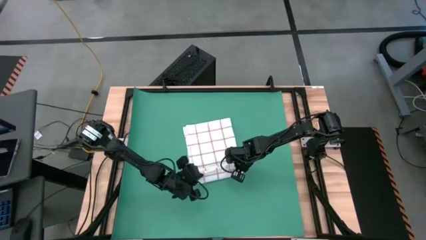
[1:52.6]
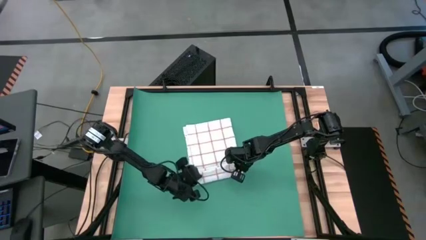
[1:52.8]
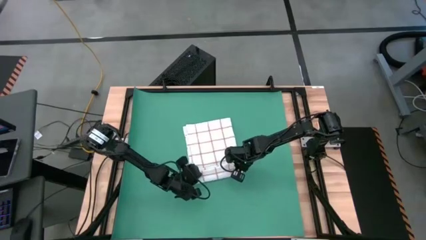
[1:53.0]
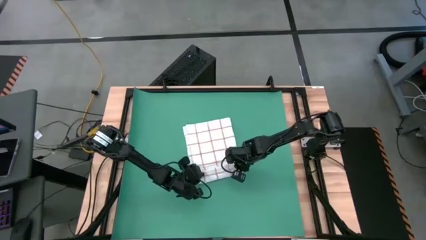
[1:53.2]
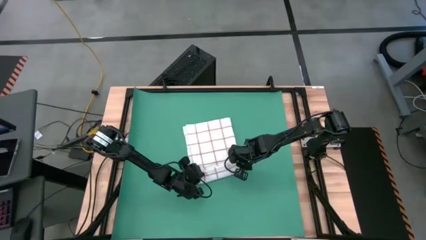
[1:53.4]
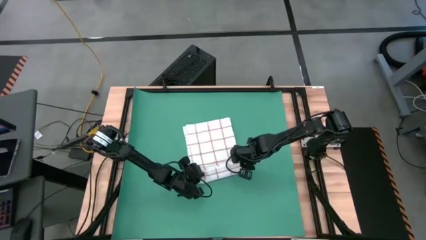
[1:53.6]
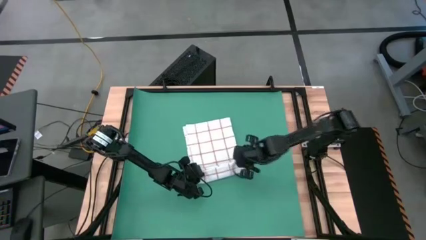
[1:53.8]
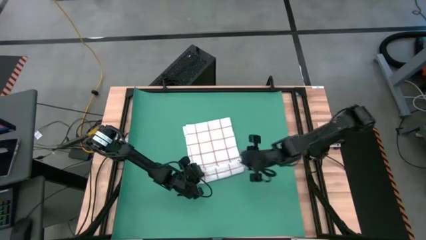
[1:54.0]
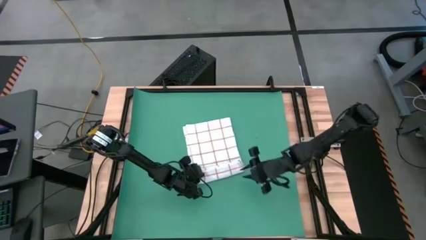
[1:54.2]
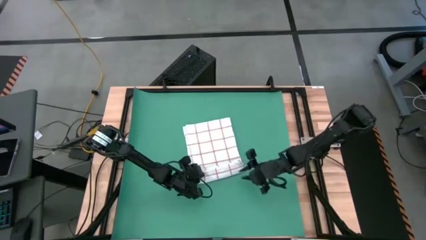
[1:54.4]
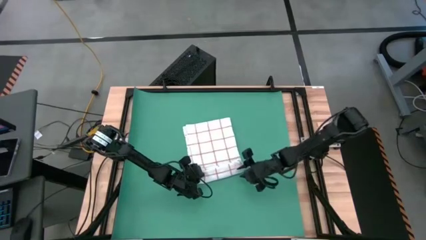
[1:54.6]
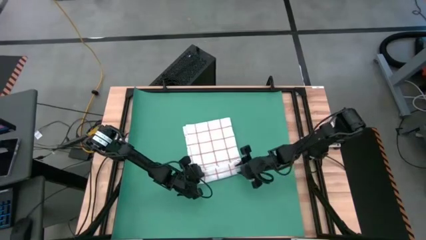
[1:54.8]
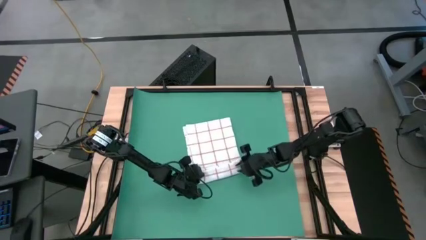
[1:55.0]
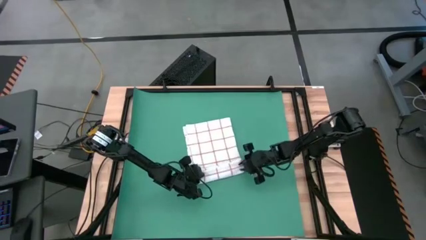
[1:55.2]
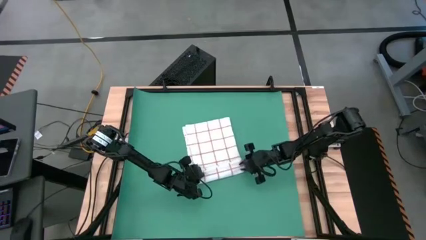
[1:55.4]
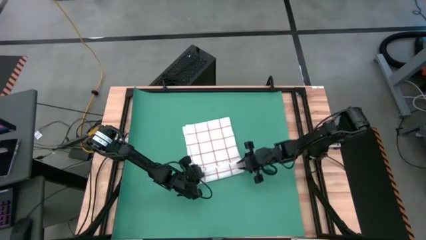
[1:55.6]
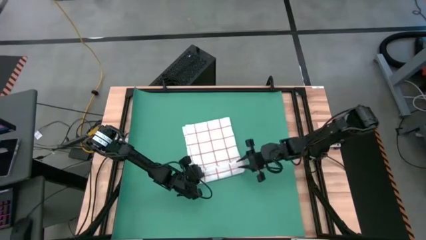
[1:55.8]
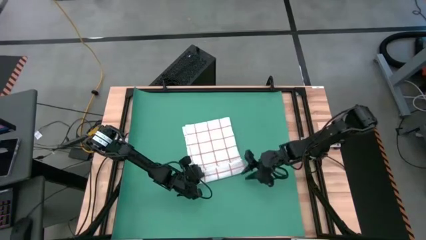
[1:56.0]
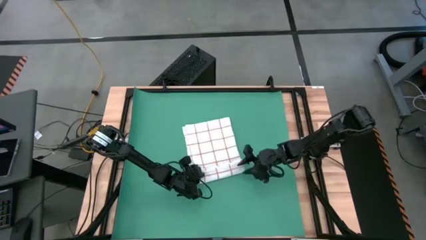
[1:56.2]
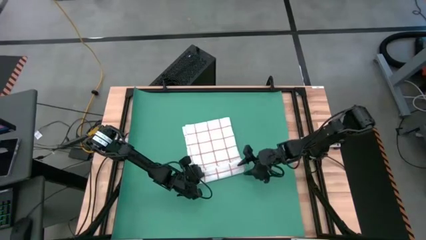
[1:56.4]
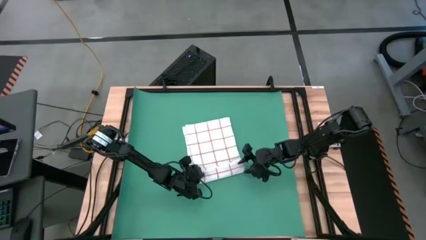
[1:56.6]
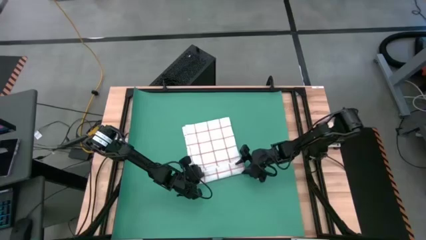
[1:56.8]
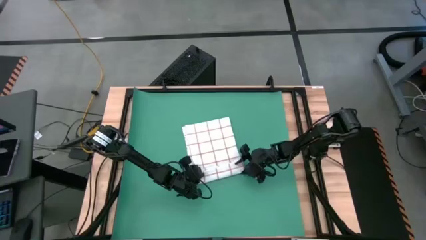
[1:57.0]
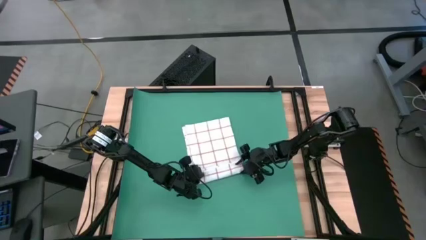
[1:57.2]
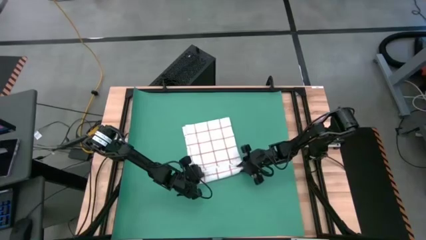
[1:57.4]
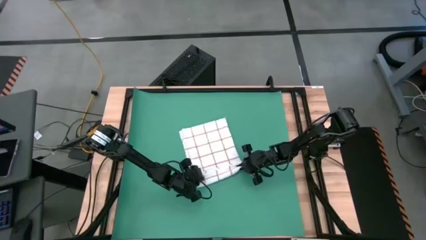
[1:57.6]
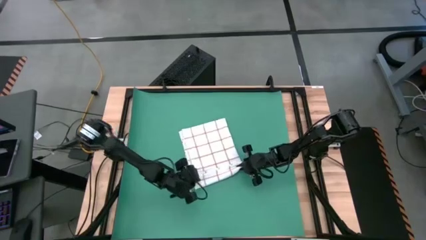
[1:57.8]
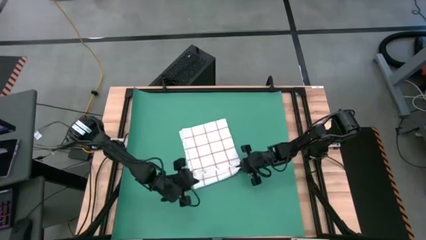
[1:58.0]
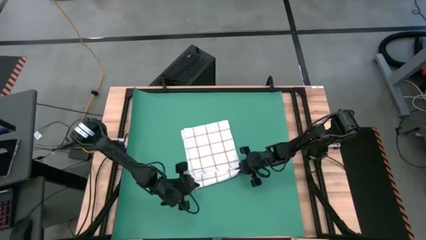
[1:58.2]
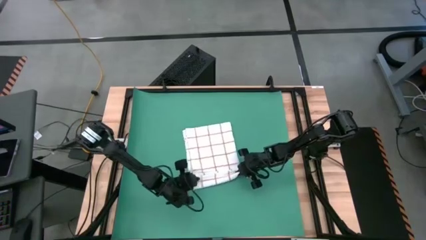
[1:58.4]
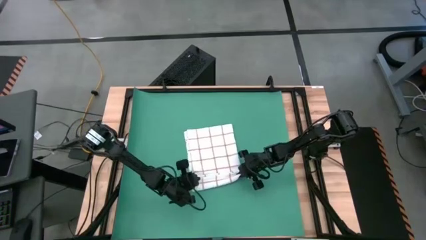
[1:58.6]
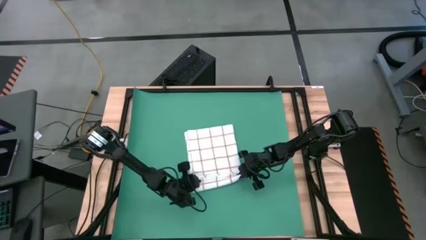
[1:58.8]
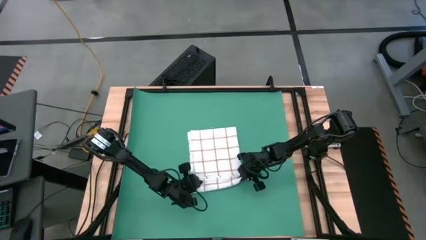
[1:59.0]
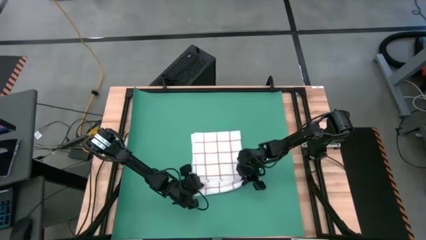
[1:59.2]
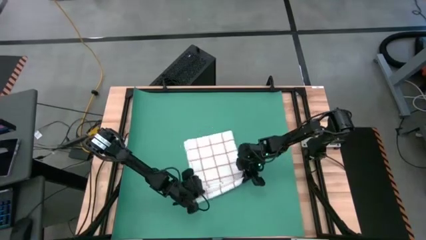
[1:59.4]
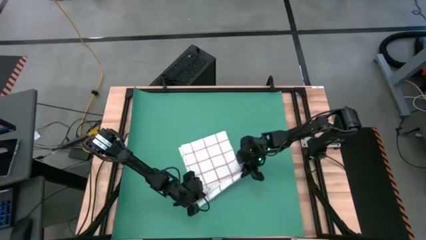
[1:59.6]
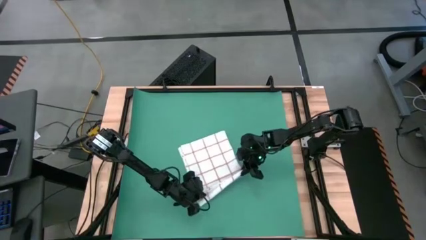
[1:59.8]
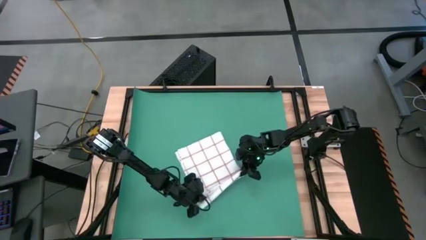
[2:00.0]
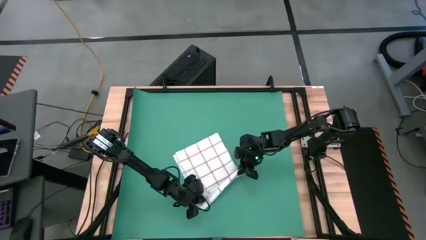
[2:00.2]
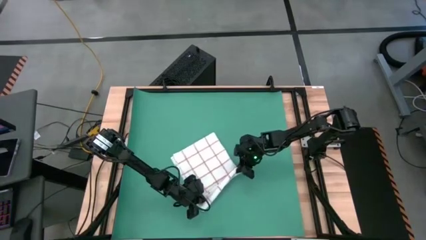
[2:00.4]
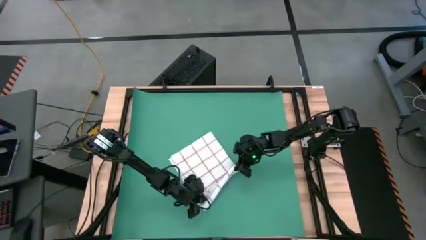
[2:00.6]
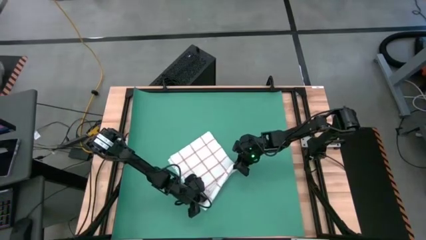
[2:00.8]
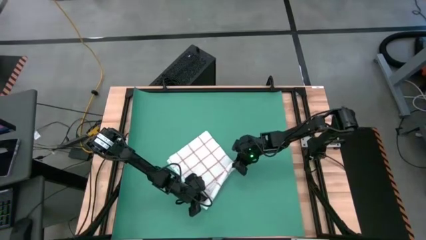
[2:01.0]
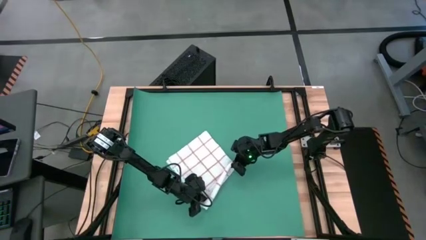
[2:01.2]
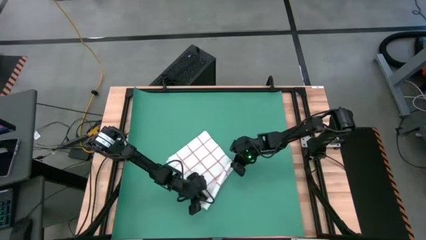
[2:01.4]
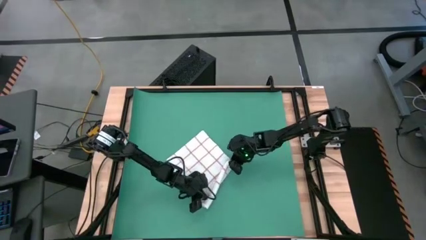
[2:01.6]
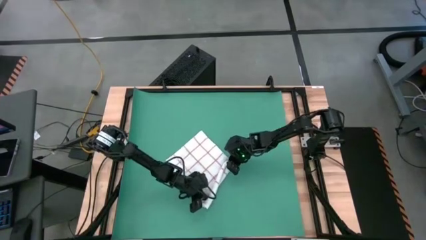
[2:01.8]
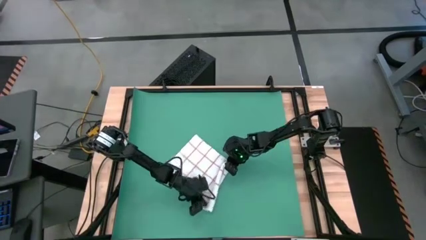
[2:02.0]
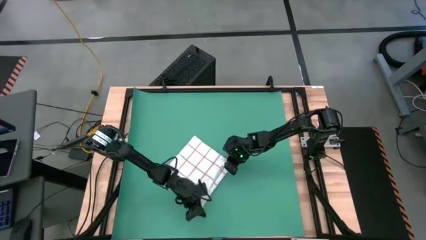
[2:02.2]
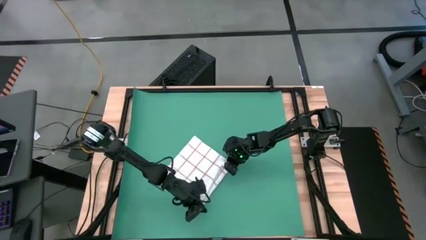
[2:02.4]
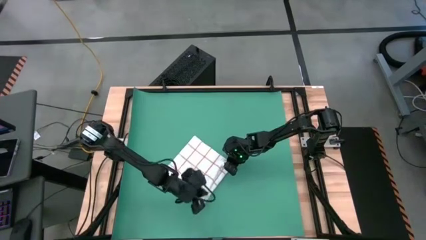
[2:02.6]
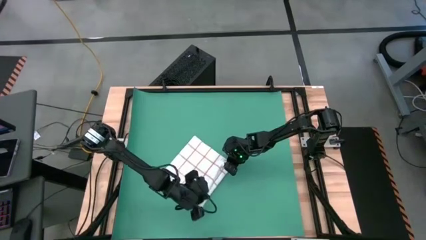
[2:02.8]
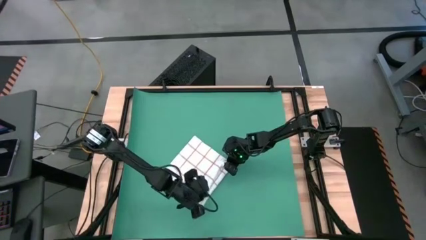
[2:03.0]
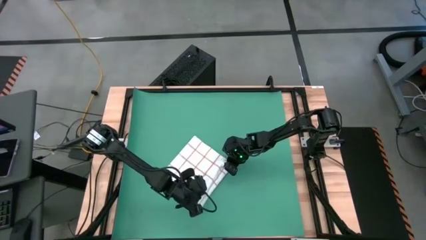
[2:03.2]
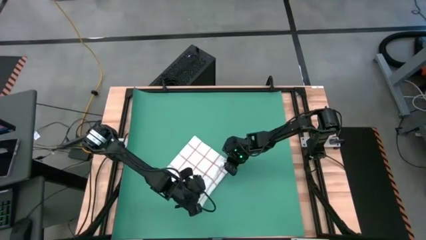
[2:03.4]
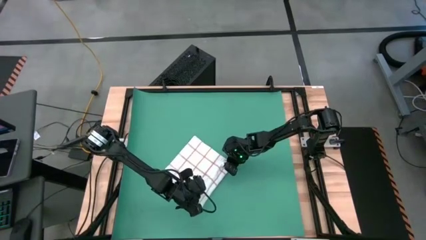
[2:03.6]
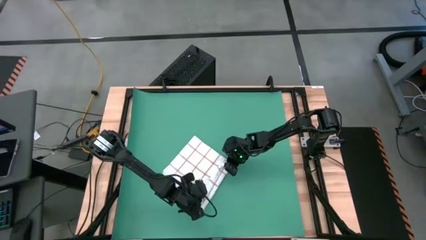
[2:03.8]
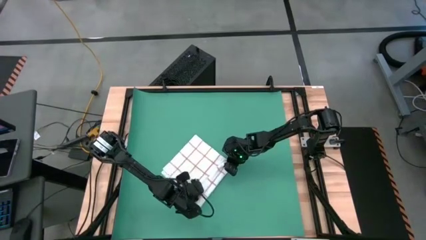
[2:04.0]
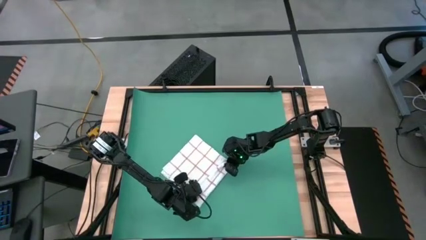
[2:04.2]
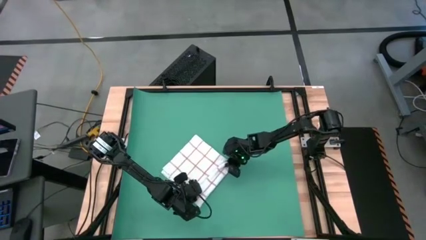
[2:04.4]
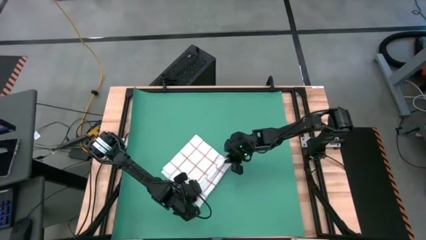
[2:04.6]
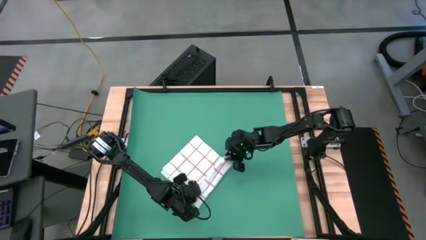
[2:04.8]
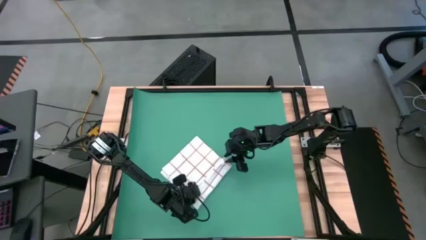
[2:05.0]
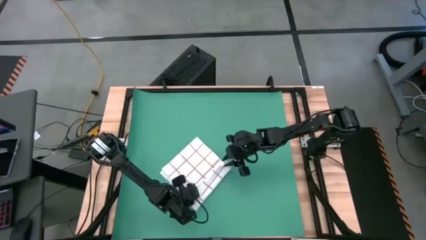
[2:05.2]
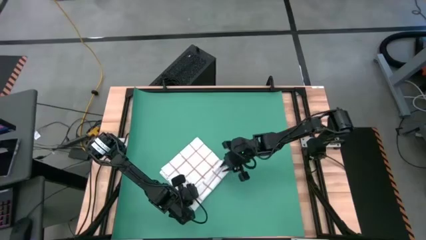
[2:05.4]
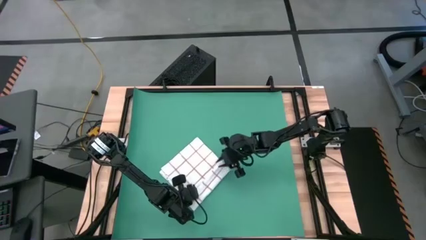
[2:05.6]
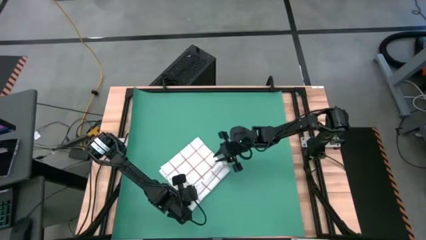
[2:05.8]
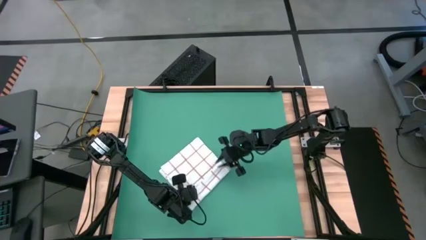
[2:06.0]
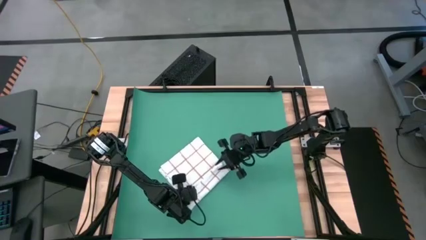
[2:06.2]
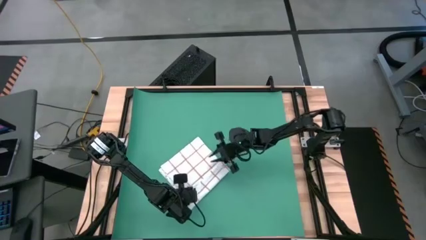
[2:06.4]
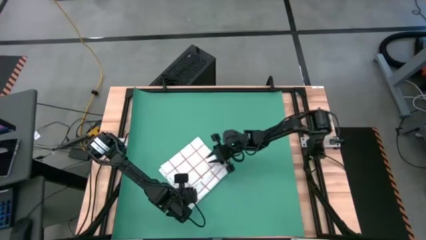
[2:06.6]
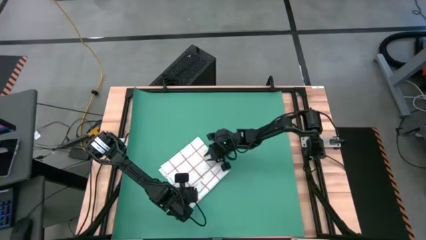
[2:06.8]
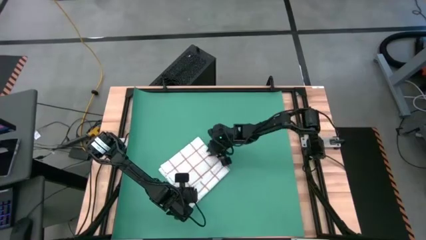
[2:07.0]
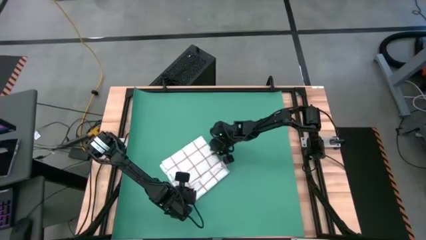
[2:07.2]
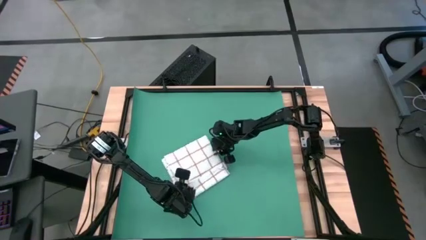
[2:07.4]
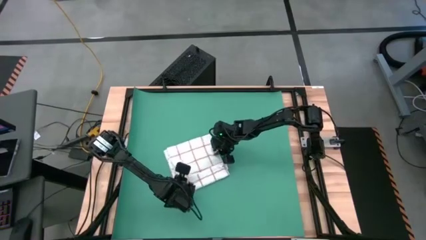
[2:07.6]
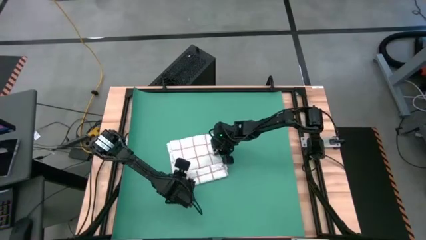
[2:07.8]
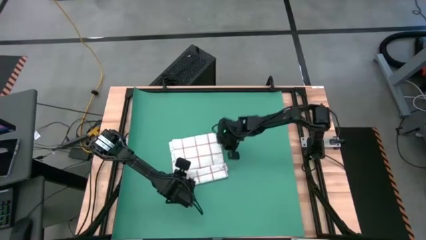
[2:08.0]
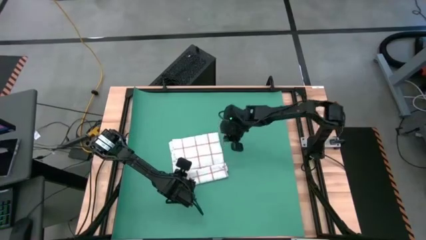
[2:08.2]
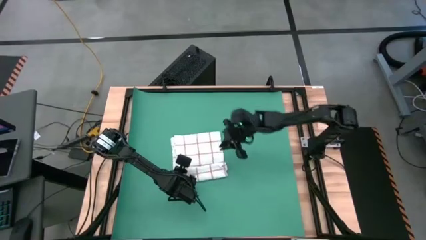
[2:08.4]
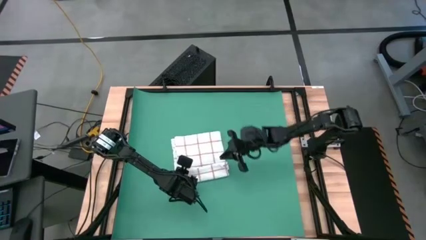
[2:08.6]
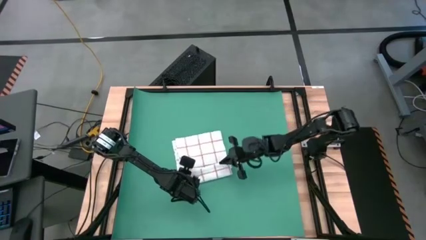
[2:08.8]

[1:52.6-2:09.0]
Task: Roll towel
Roll the white towel
